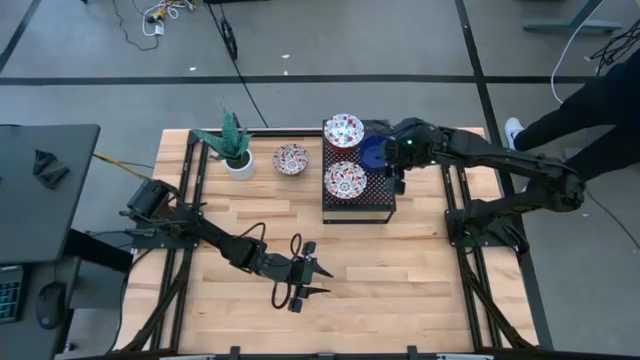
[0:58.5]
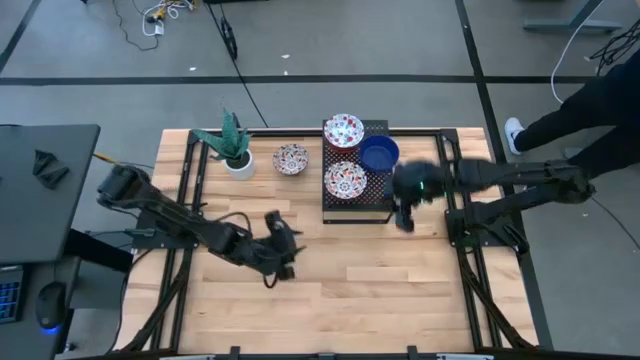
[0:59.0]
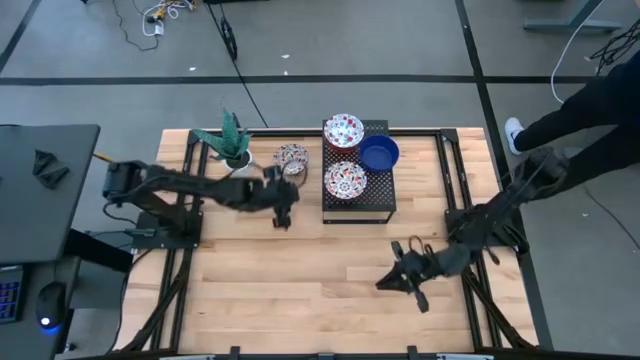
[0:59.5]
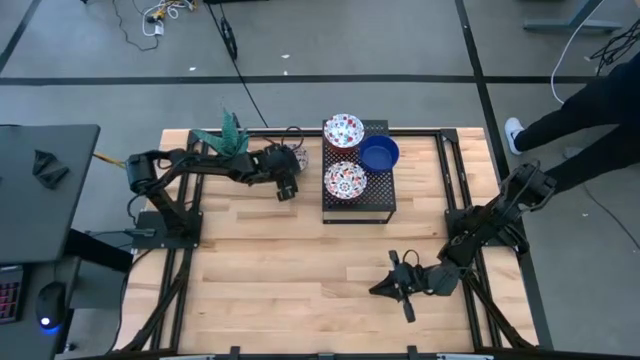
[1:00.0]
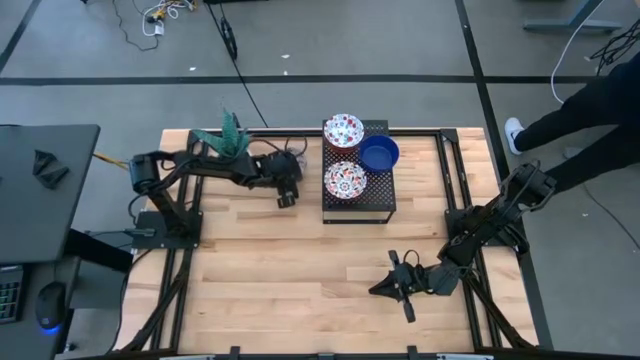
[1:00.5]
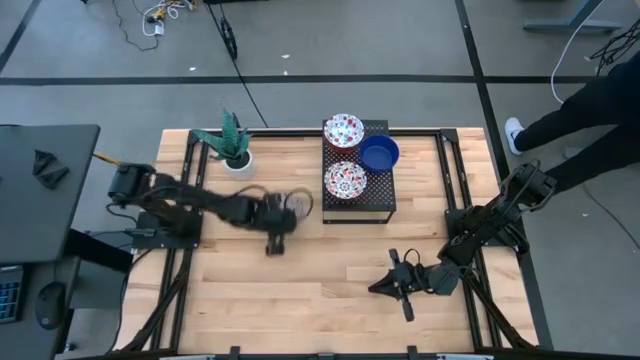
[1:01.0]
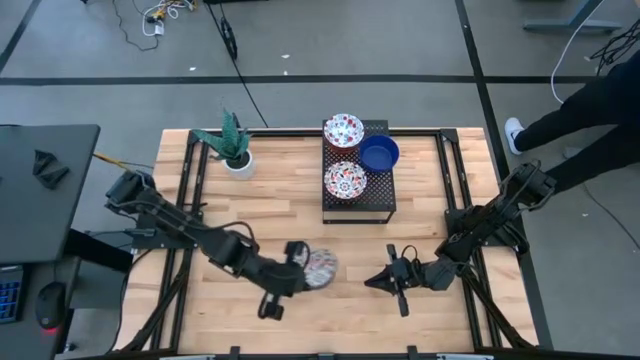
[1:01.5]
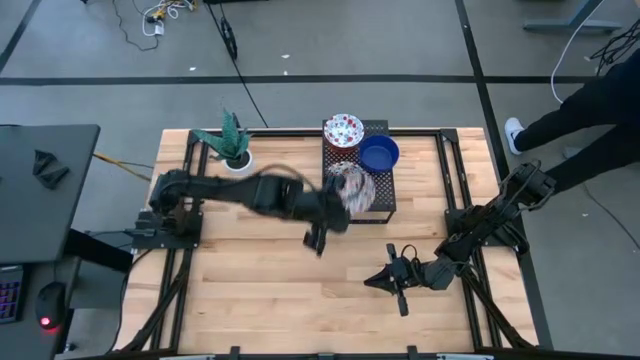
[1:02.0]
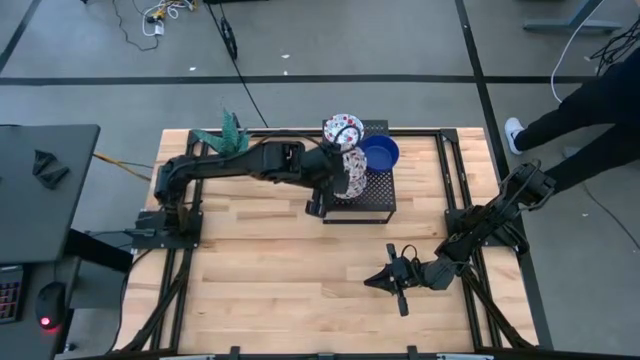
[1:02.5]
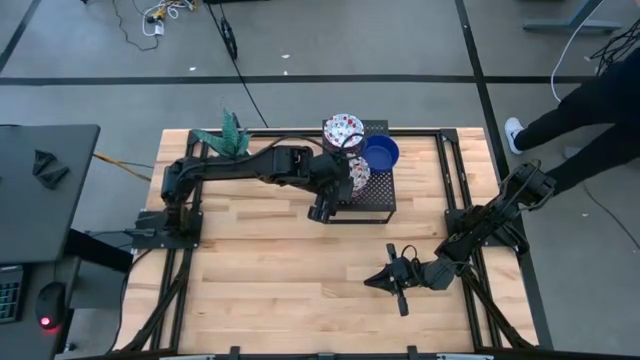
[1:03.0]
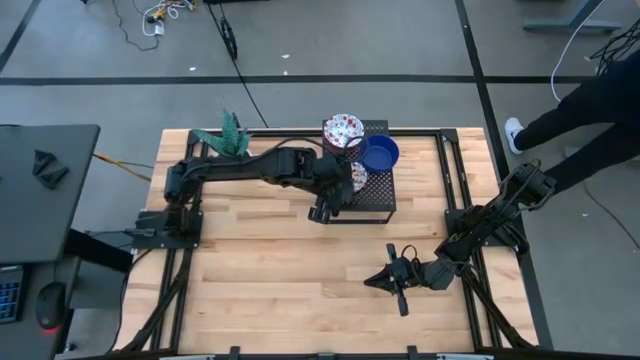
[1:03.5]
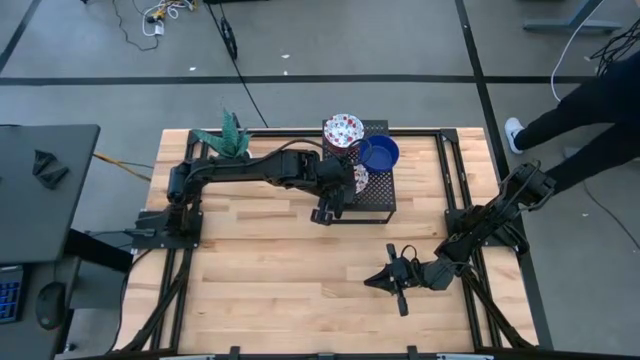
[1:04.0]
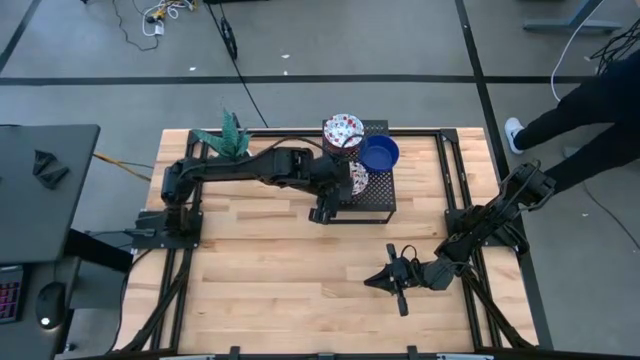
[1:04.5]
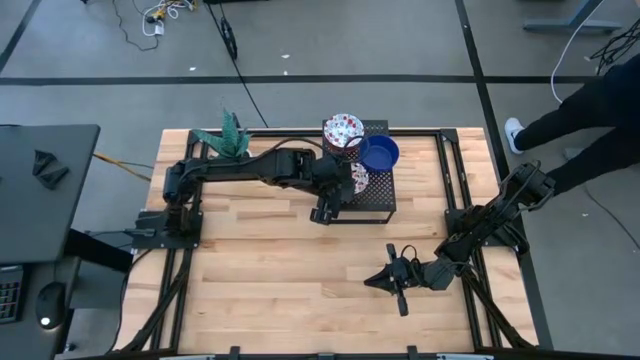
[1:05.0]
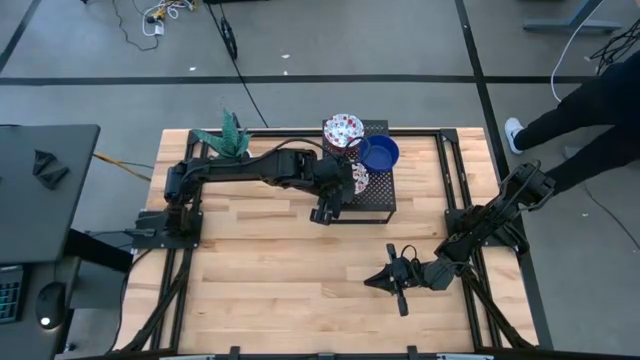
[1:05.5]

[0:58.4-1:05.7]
Task: Pick & Place Mini bowls
Stack the orange white bowl on top of the orange white bowl on the shelf

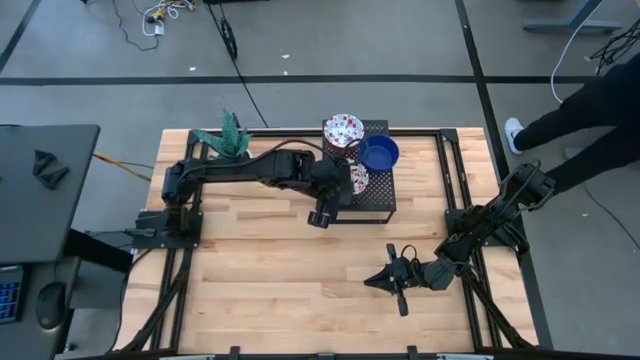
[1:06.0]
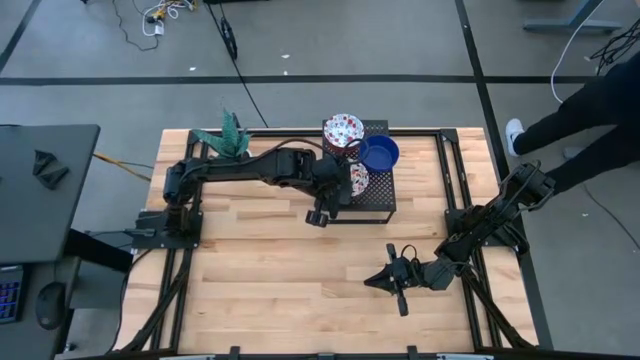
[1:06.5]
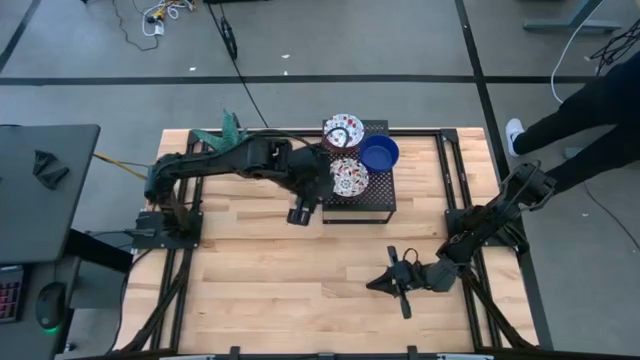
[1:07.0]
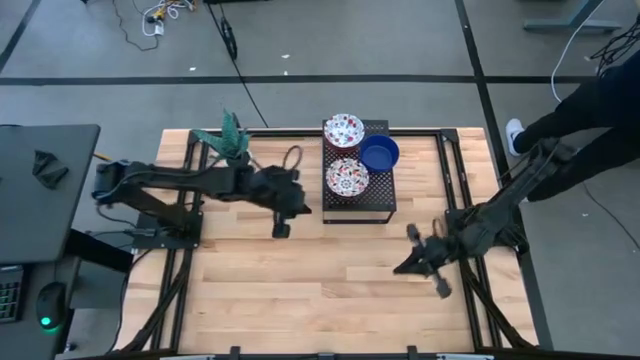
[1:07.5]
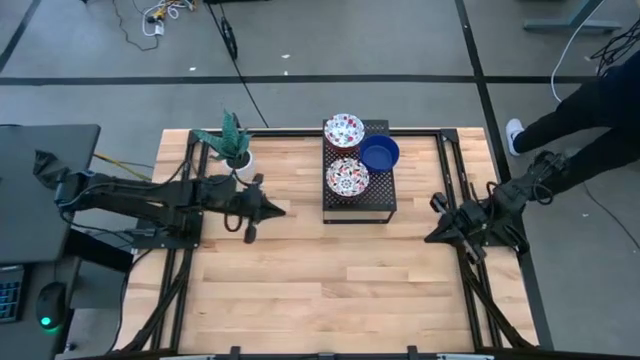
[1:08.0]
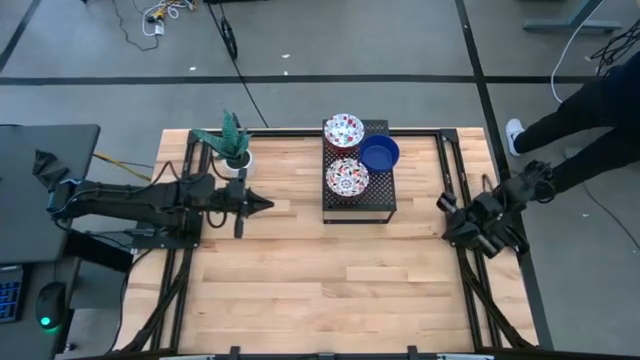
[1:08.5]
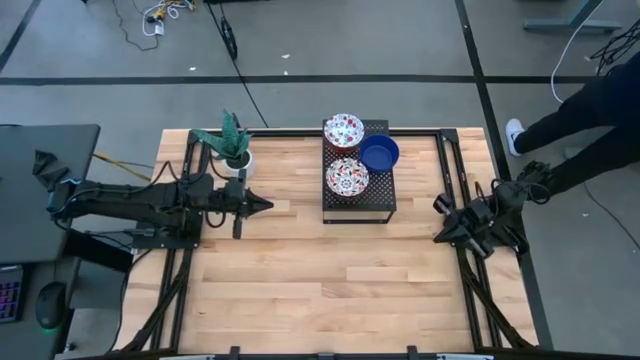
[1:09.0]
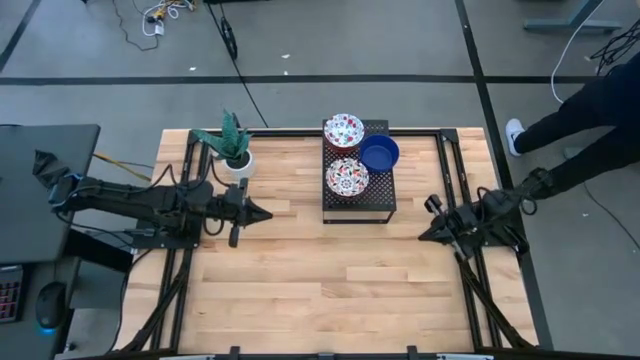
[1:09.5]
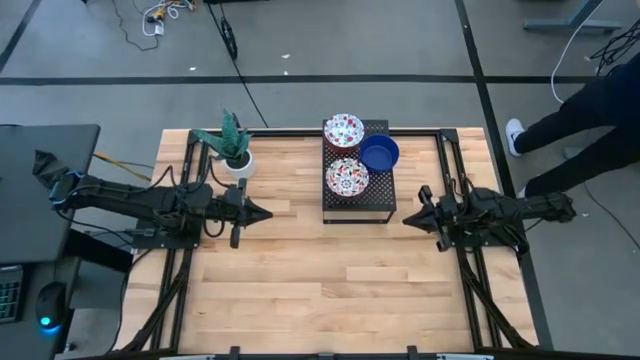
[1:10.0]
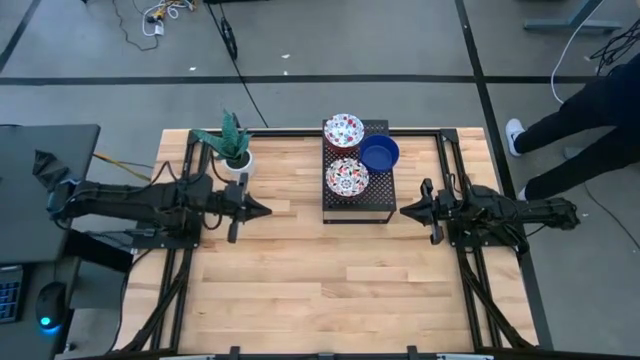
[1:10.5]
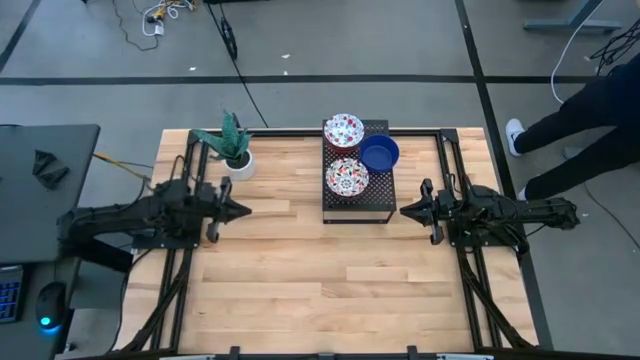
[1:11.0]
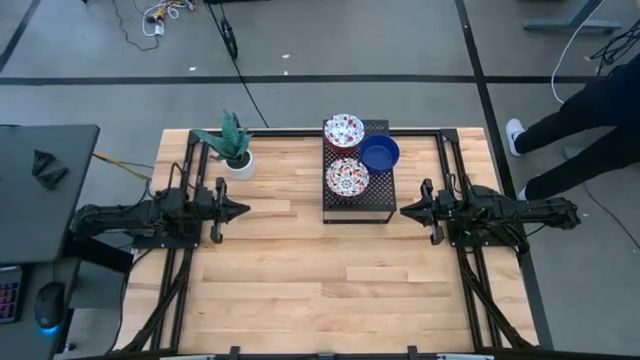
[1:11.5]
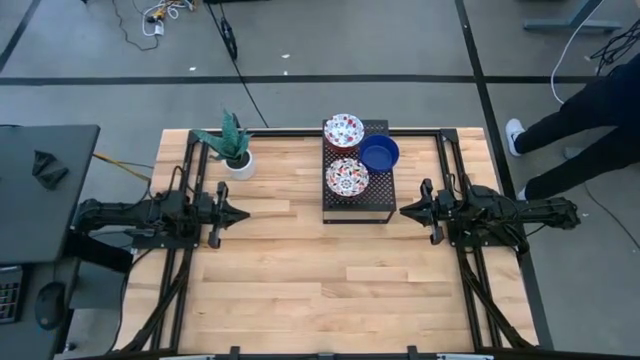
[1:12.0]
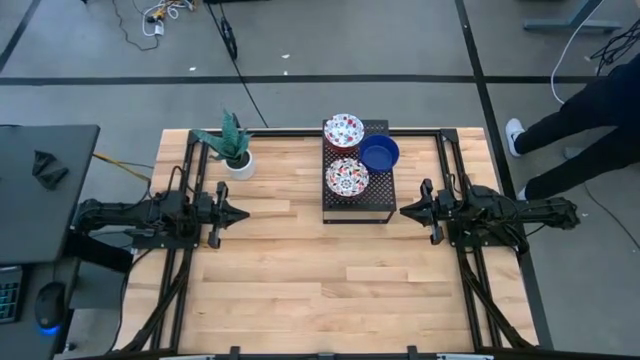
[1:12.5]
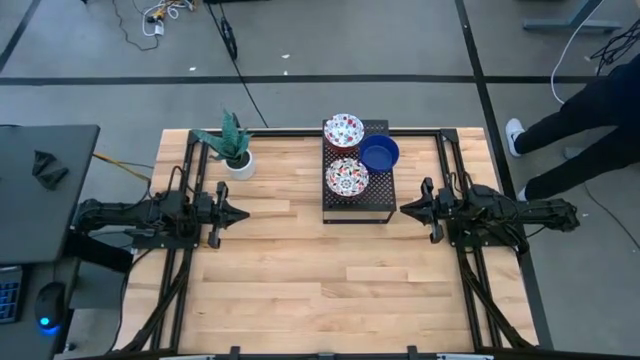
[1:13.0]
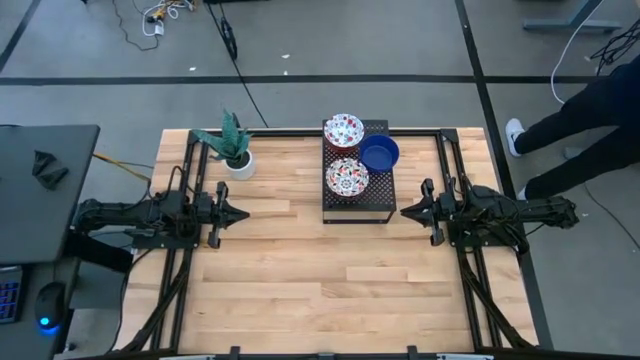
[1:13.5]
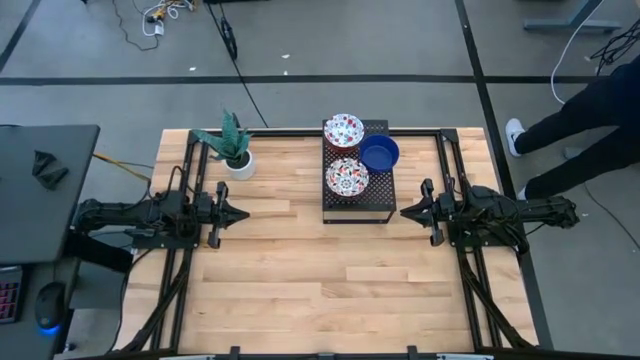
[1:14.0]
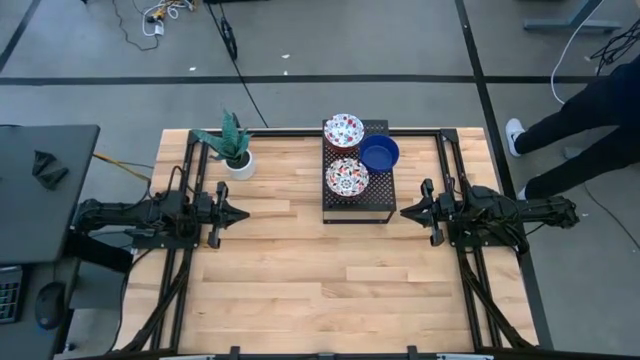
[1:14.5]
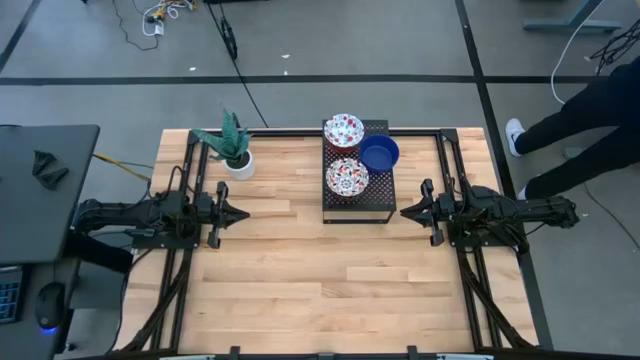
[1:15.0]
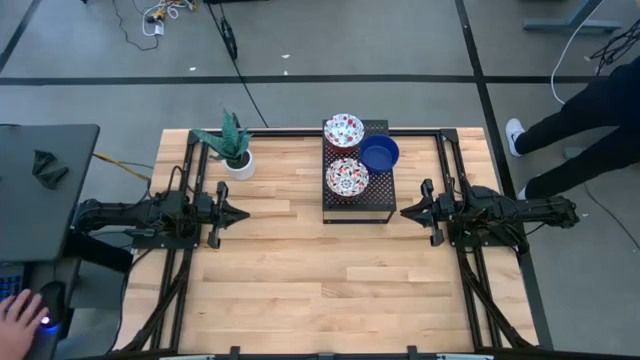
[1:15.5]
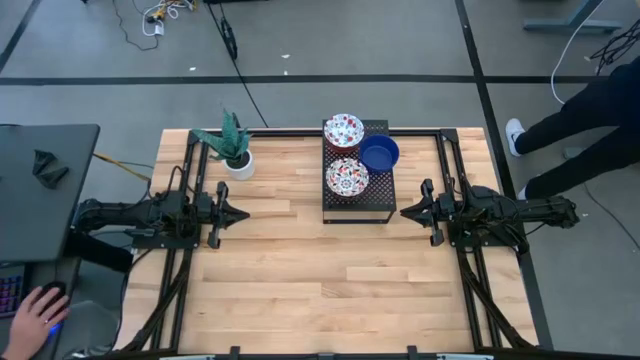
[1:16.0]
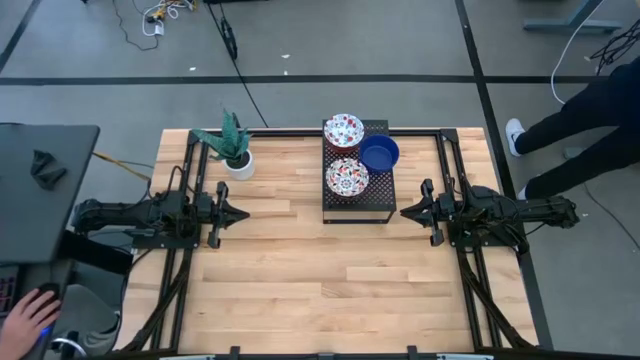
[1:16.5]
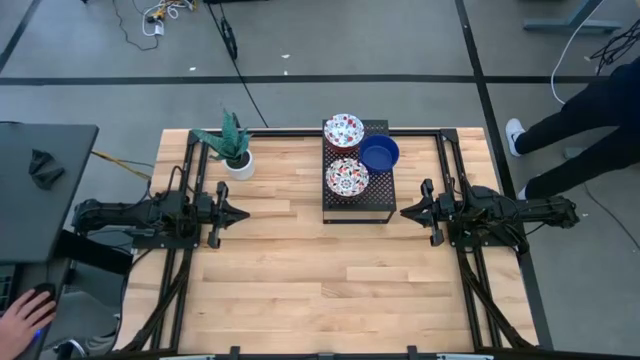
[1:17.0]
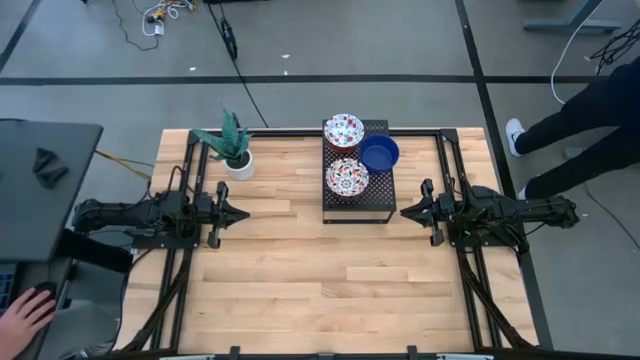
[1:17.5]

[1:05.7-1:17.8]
Return to Home Position

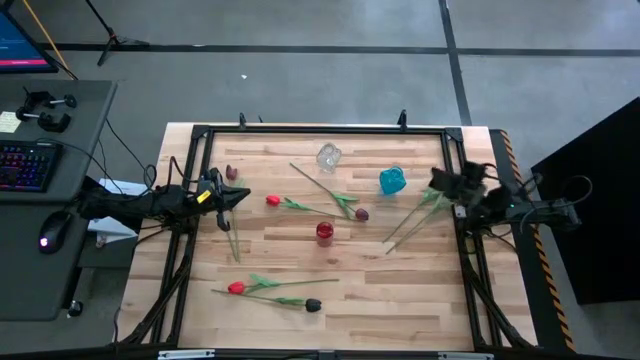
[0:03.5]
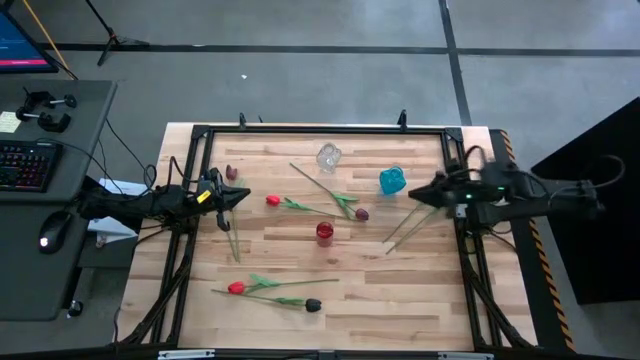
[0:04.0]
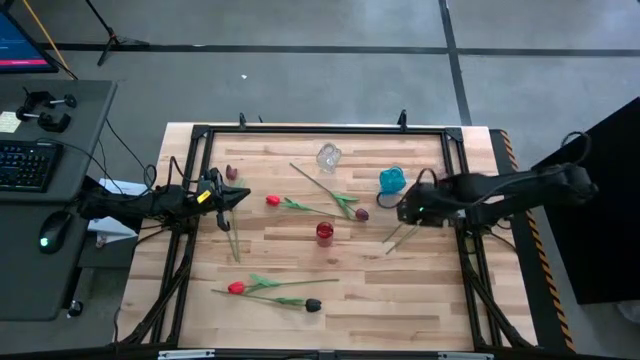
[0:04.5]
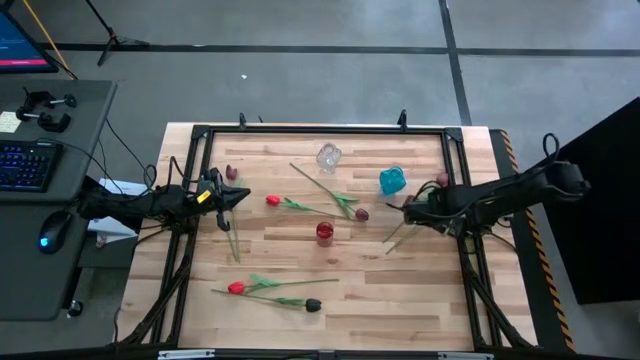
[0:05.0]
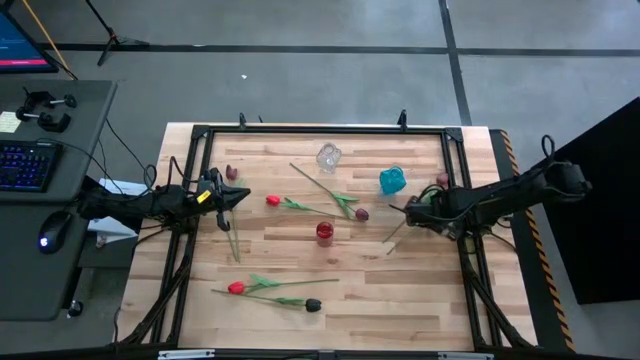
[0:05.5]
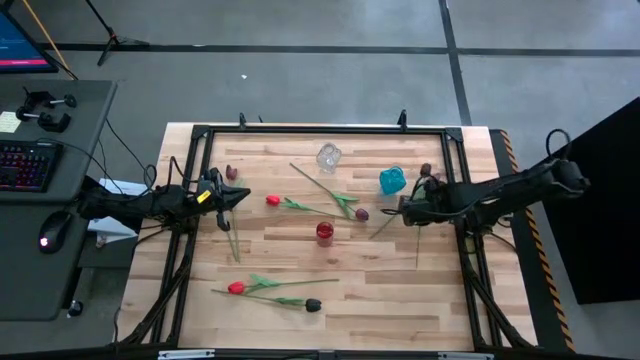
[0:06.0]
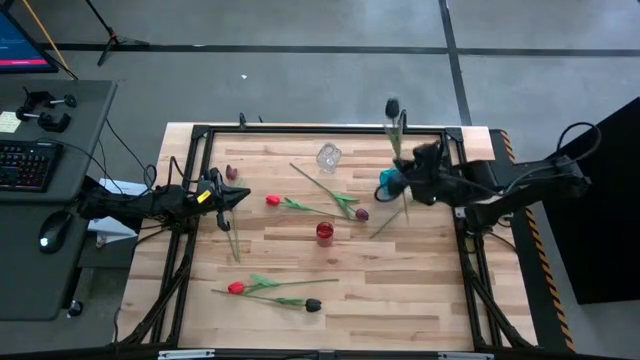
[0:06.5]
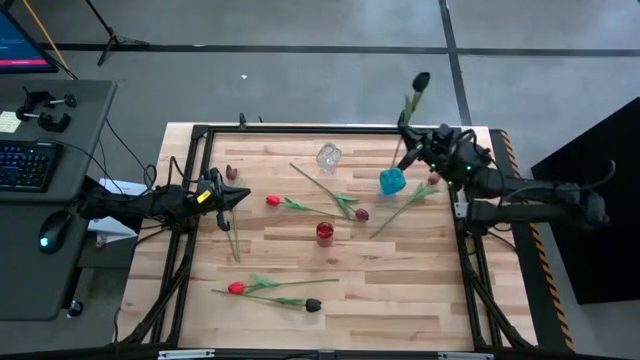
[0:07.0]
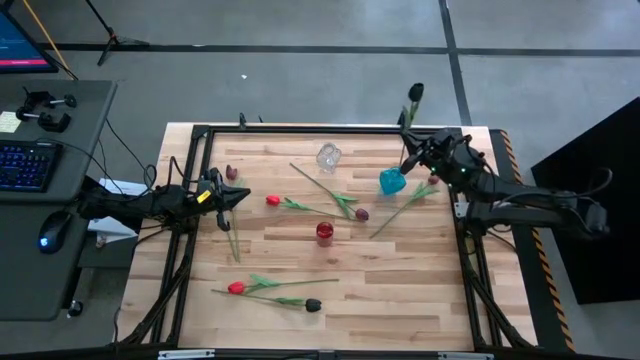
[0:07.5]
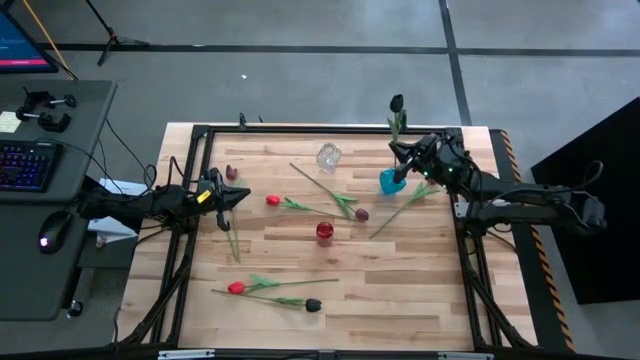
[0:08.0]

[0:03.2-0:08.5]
Task: Sort flowers into vase by color
Put the top right black flower into the blue vase
